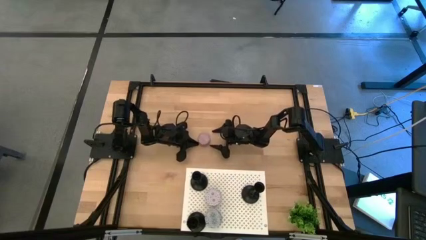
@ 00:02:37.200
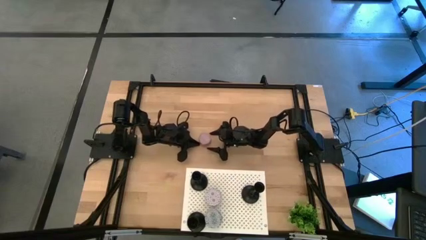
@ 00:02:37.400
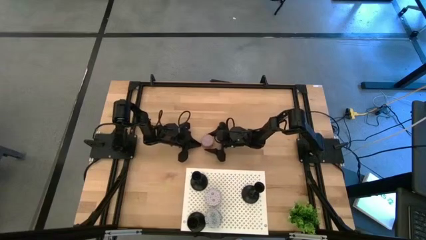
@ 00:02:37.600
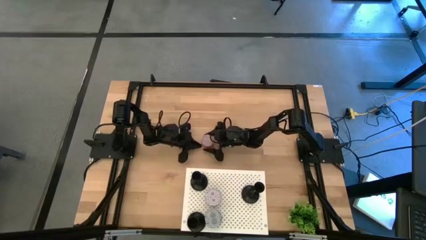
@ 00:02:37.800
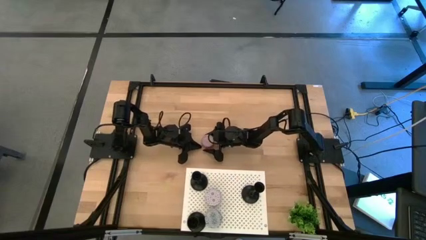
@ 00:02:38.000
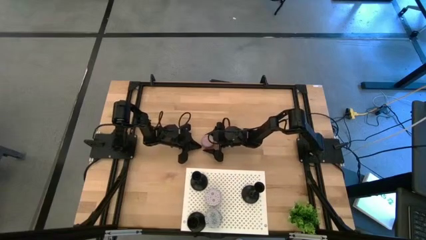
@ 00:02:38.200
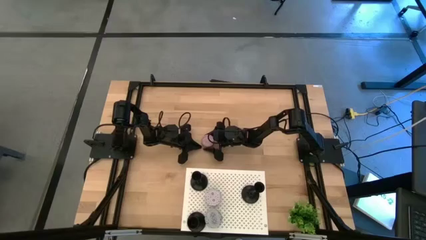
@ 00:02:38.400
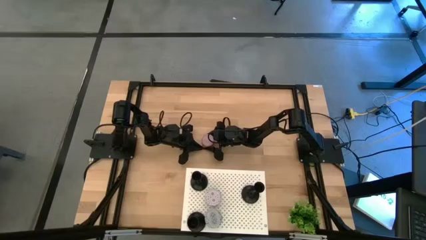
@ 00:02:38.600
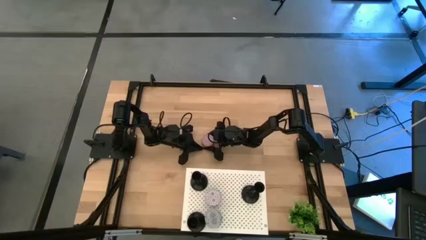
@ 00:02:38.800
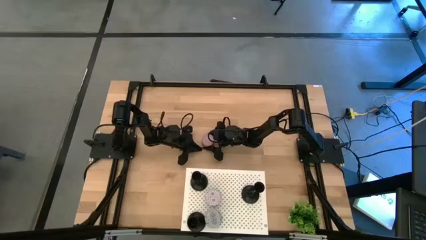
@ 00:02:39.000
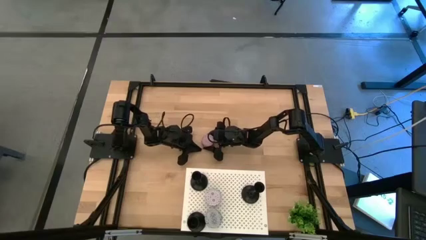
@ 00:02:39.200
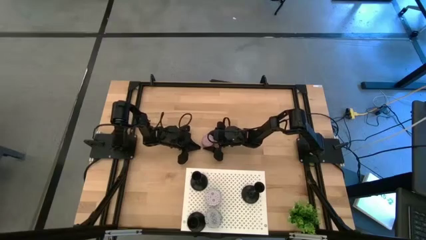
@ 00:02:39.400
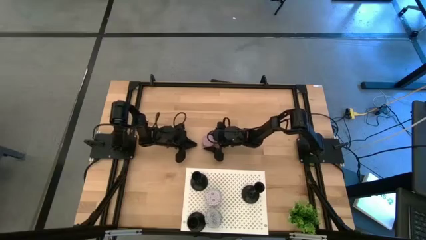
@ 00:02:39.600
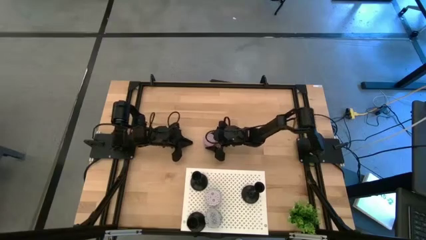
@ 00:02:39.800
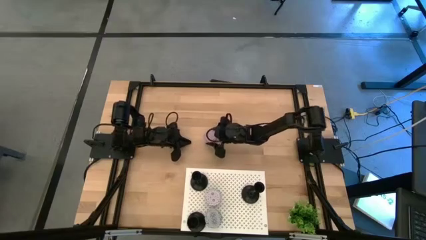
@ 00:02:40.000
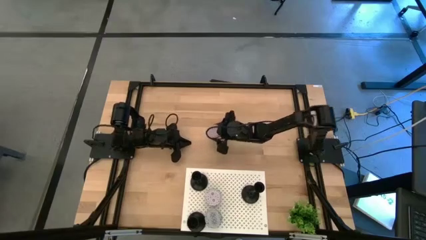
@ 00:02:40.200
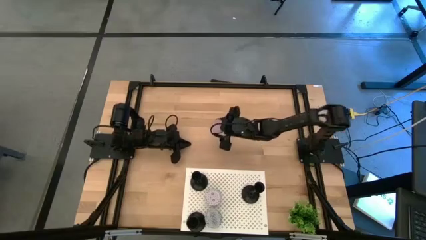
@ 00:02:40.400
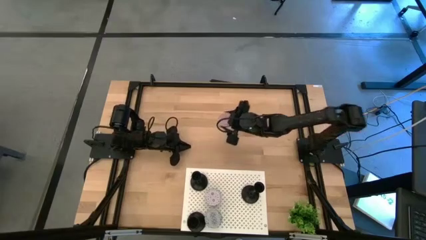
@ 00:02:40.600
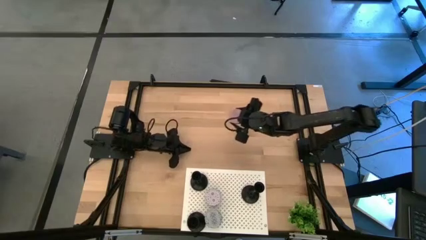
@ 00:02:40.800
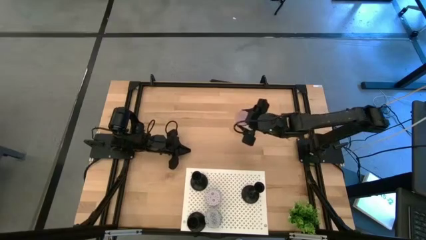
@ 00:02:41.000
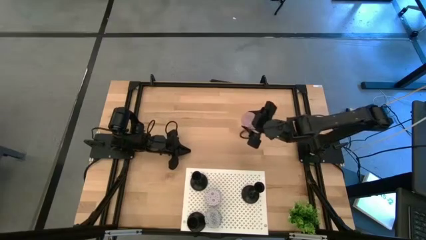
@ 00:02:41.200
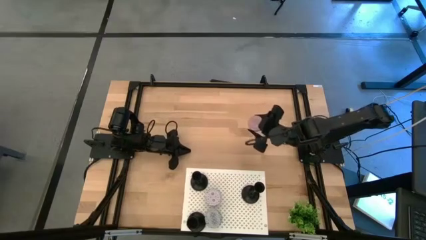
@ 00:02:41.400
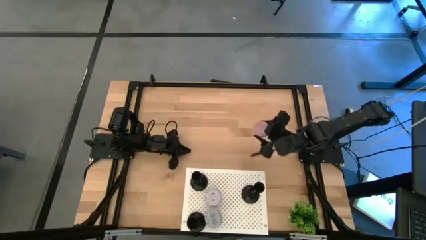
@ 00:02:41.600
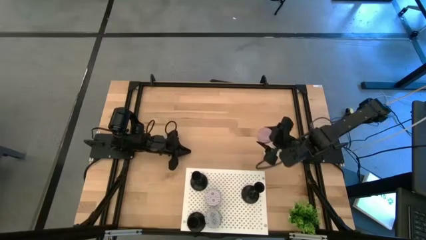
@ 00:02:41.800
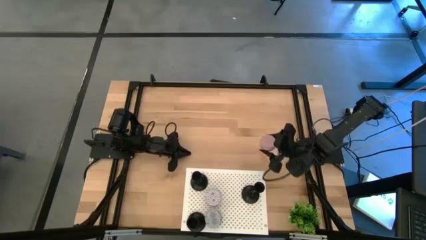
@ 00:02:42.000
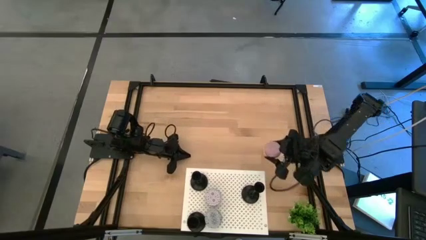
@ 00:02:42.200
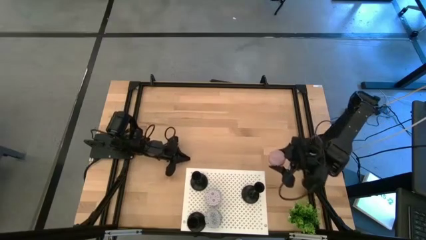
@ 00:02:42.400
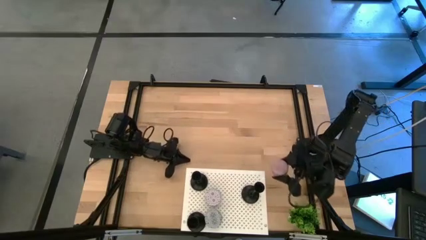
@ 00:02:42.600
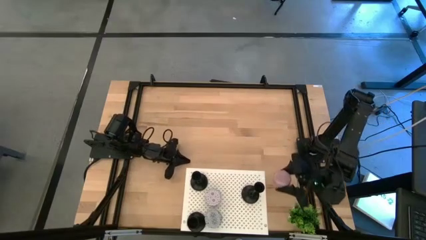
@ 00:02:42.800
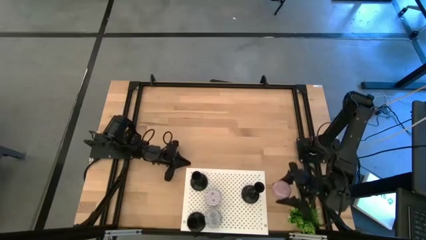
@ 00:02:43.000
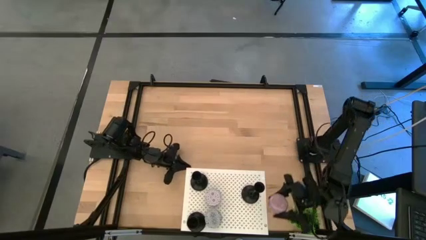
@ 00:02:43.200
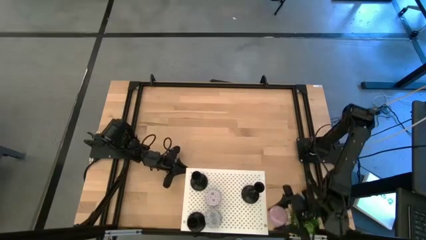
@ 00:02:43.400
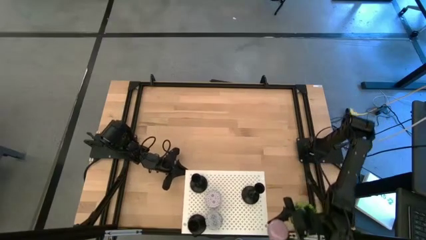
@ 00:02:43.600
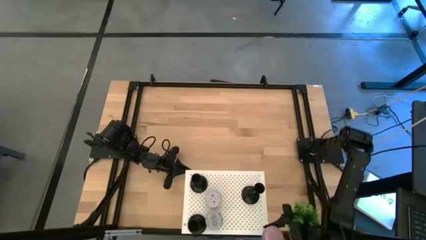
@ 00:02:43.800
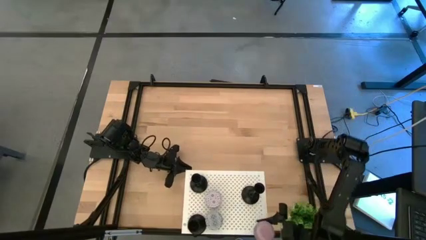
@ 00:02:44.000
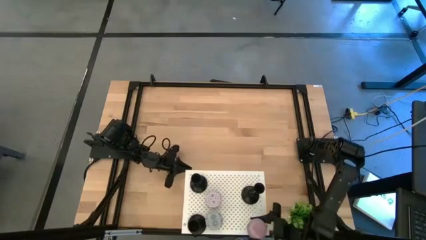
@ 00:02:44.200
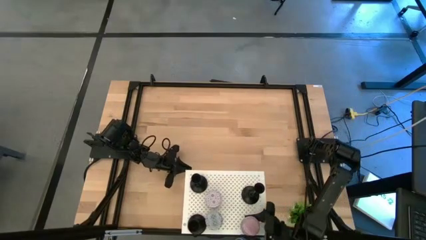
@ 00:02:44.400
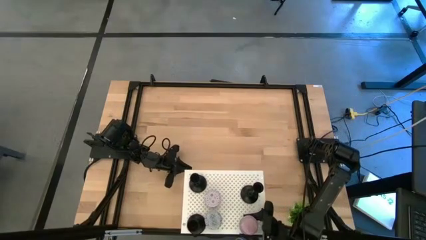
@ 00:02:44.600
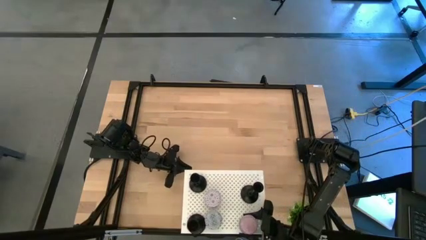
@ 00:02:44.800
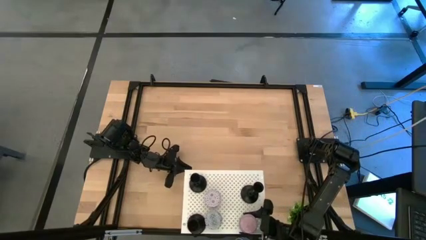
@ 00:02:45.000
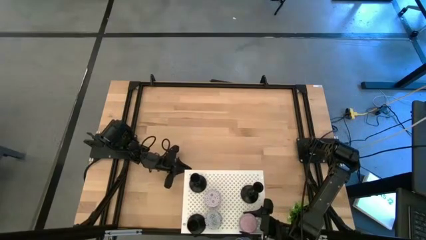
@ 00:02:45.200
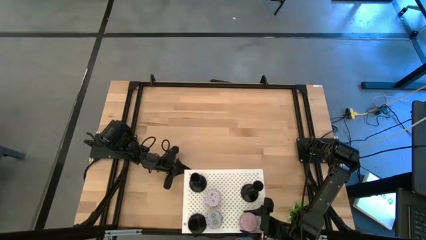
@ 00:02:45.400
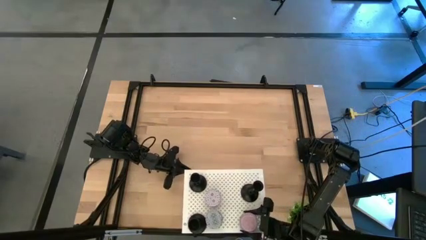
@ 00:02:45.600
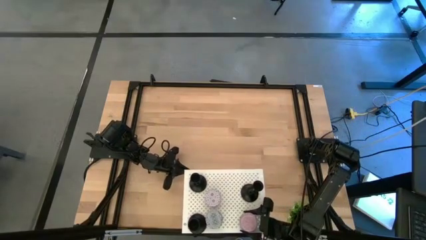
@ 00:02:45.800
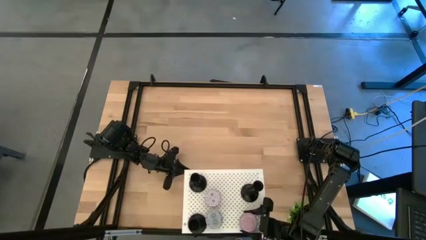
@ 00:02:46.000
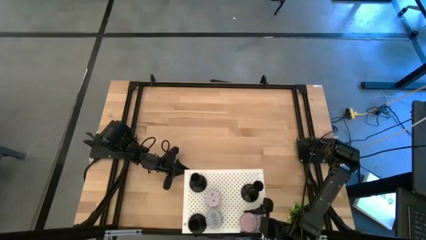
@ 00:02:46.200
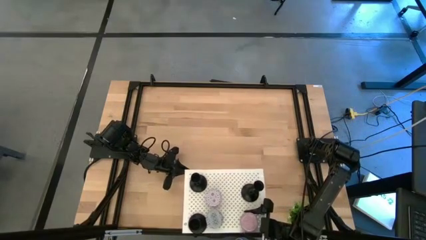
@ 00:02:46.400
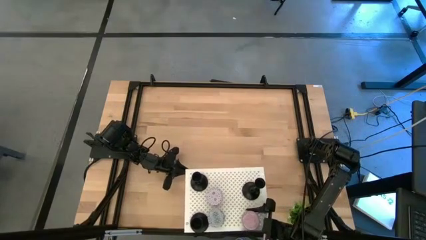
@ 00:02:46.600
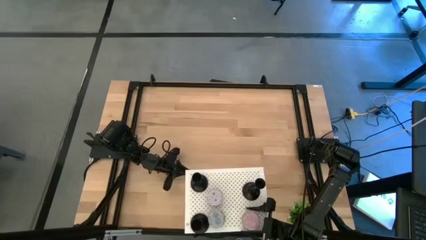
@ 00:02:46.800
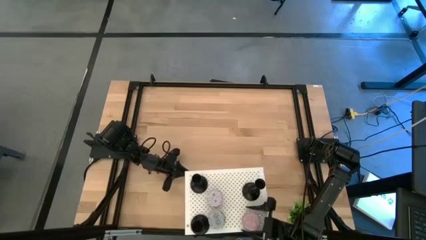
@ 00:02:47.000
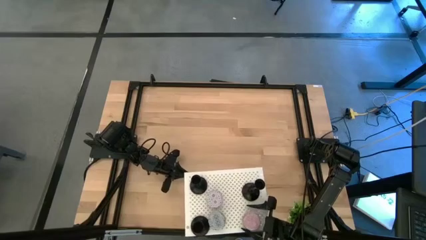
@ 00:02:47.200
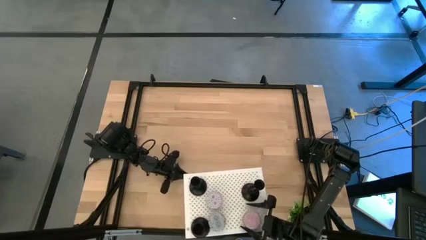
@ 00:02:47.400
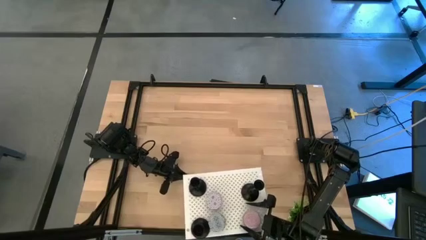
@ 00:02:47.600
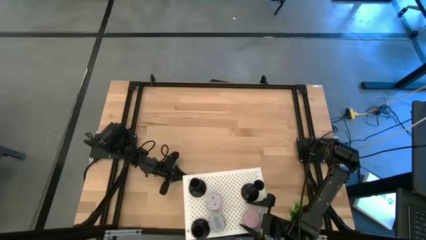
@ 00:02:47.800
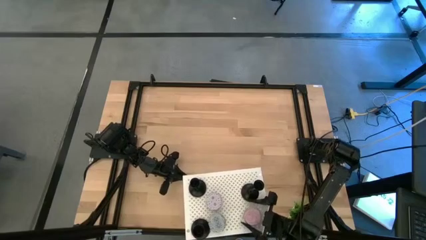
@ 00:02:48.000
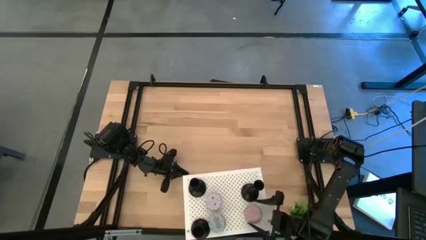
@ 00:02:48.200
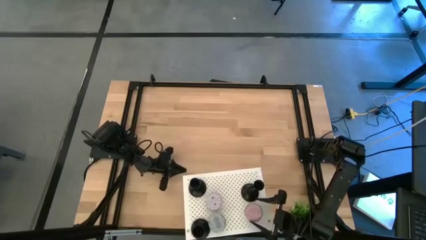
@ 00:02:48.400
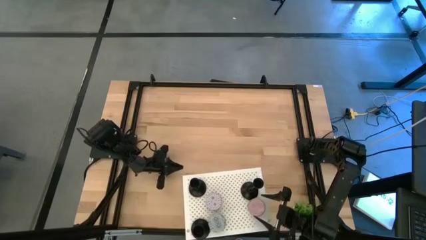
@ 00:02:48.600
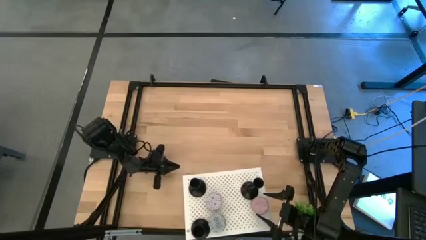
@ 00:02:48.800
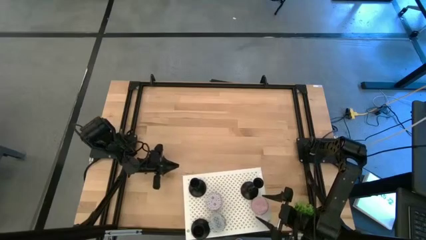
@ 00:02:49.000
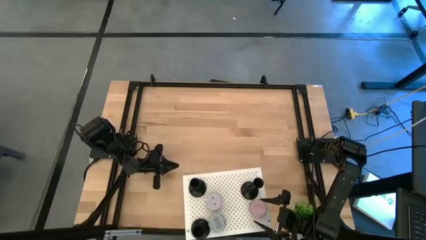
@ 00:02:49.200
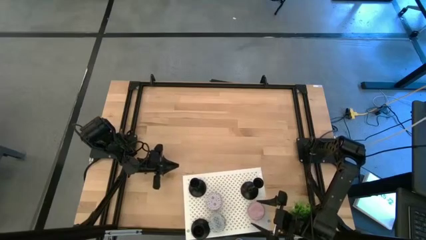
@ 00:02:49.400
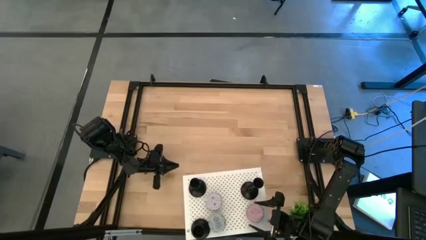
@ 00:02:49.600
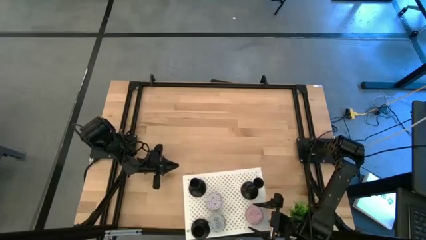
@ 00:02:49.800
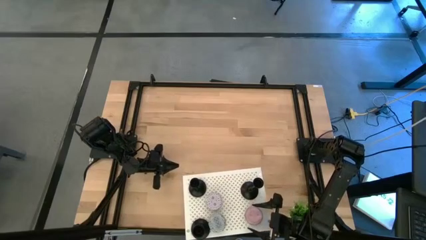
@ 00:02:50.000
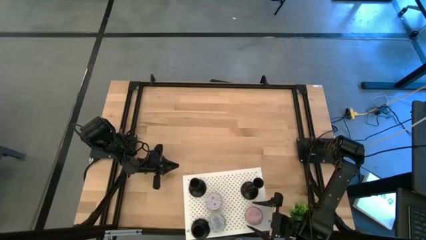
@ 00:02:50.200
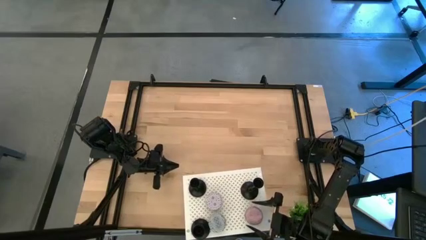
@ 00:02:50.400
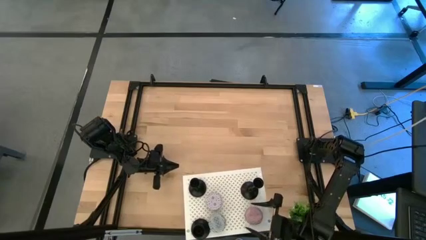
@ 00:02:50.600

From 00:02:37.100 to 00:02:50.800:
Task: Pick & Place candle stick holders
Put the scented candle on the shelf

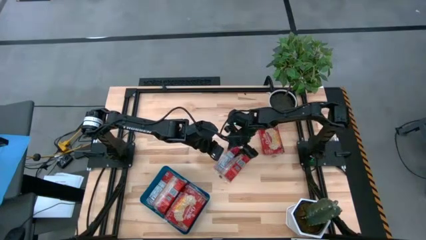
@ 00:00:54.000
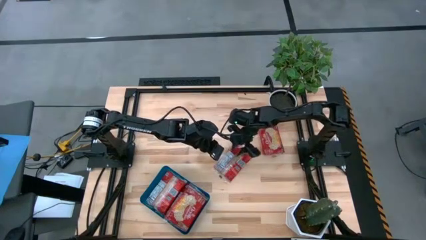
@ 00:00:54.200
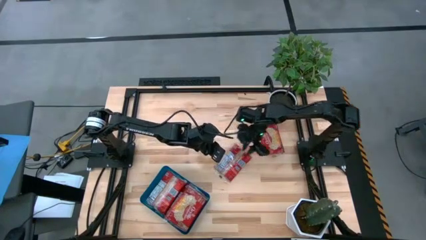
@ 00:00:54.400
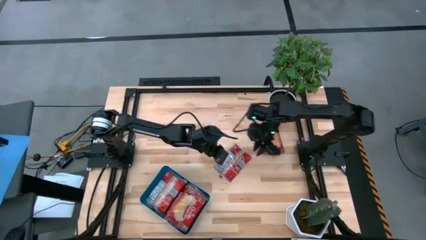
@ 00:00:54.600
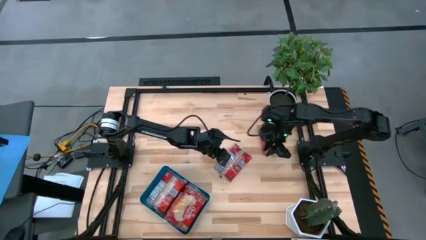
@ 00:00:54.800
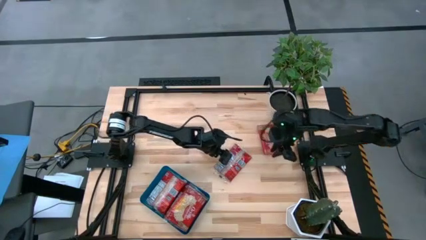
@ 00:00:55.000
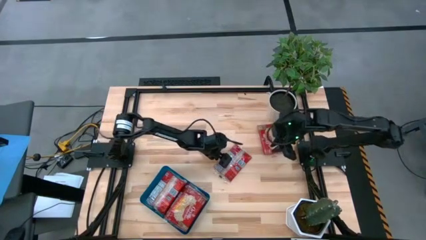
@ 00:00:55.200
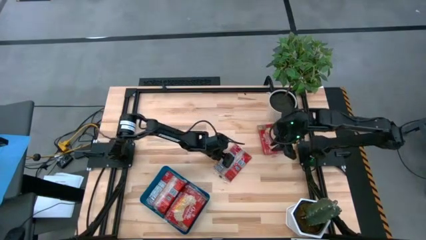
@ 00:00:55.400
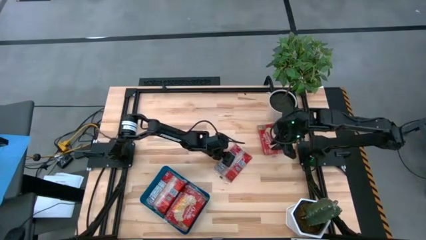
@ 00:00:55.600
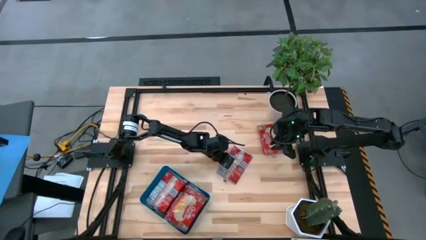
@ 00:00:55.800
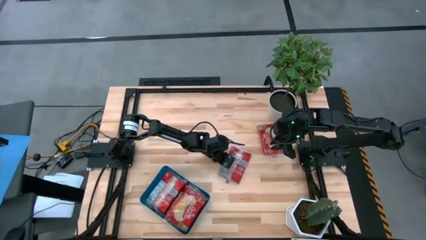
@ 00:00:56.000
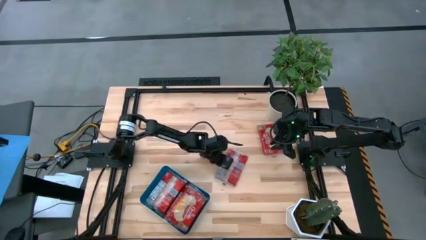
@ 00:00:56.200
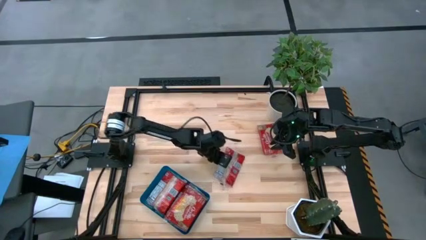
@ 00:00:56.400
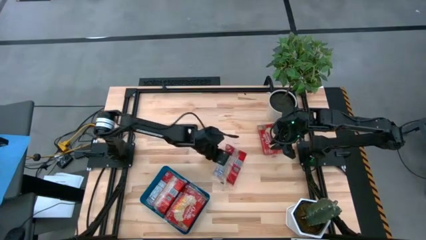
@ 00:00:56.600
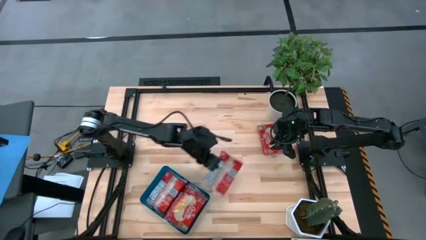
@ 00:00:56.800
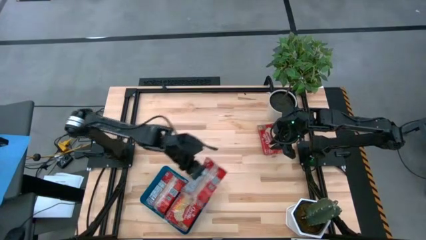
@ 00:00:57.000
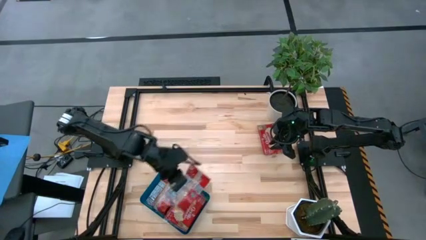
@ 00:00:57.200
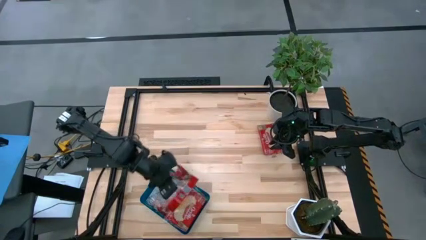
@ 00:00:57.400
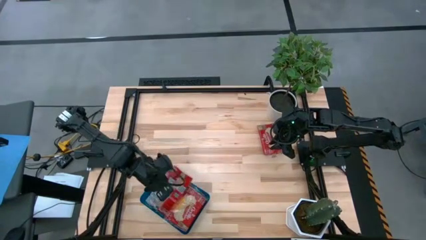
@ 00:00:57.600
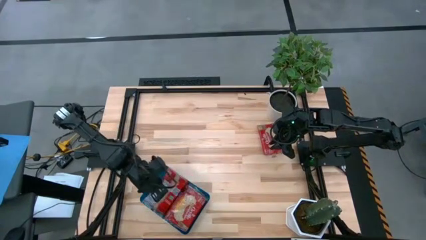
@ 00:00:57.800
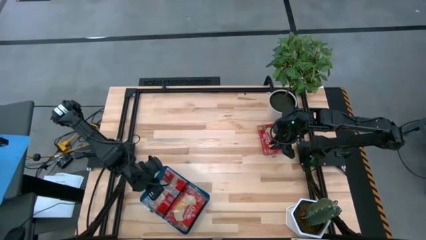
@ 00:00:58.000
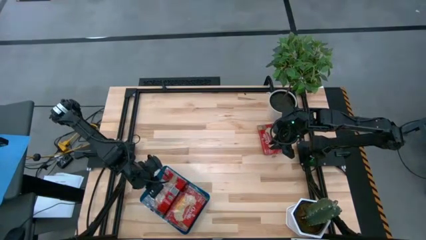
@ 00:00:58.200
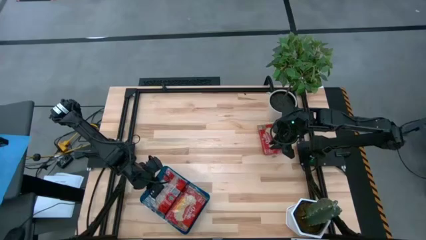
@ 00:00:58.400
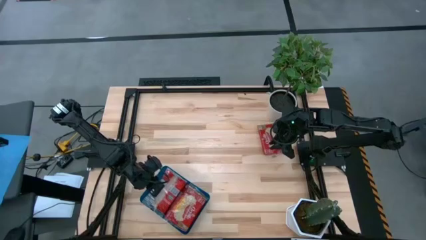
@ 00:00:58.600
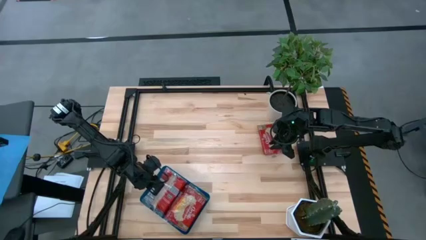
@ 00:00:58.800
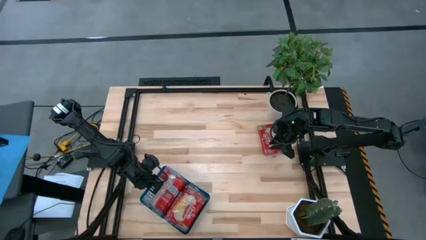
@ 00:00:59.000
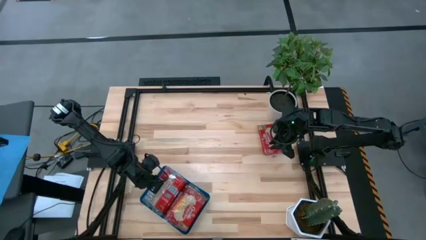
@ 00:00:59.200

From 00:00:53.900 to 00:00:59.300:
Task: Sort popcorn bags into baskets
Put the red popcorn bag into the blue bin
